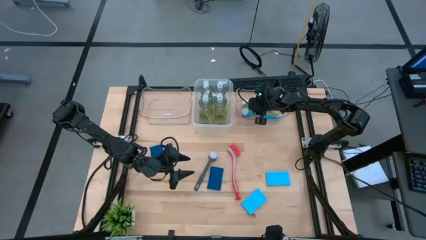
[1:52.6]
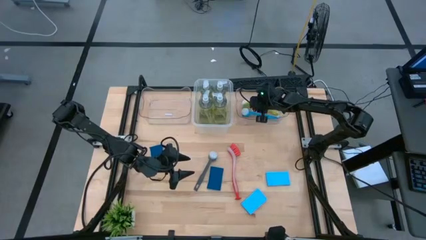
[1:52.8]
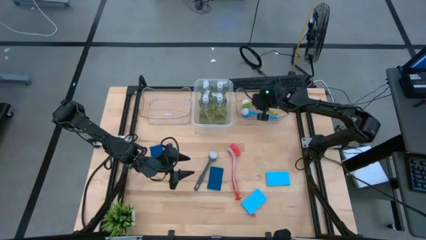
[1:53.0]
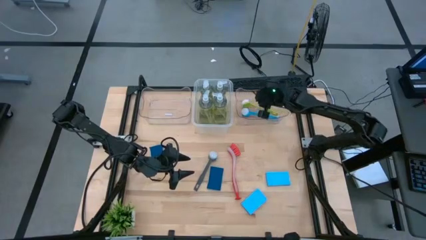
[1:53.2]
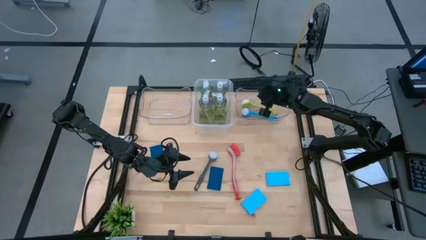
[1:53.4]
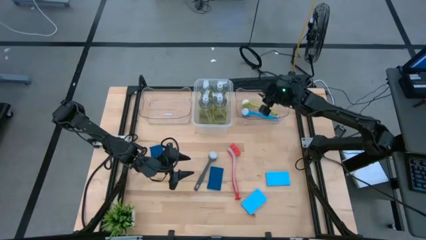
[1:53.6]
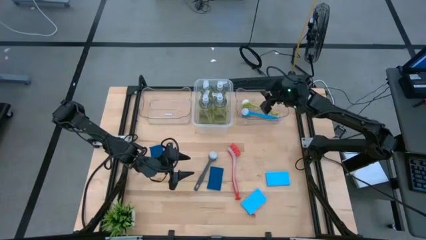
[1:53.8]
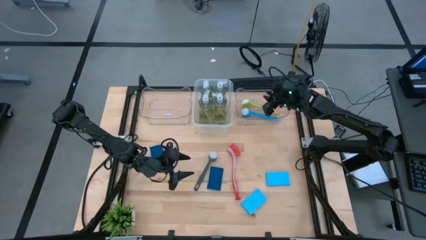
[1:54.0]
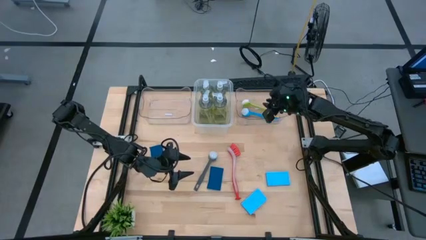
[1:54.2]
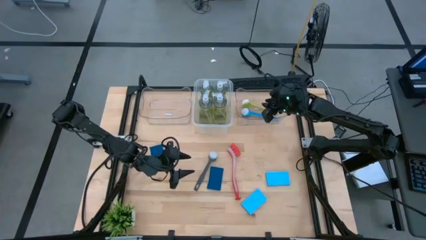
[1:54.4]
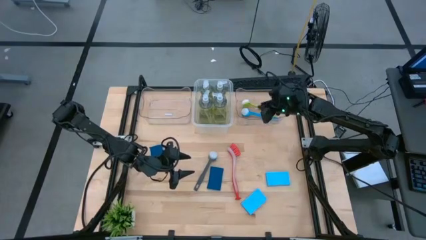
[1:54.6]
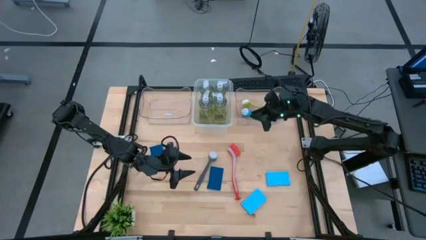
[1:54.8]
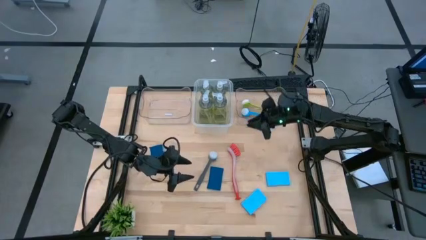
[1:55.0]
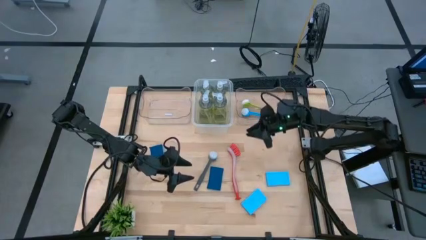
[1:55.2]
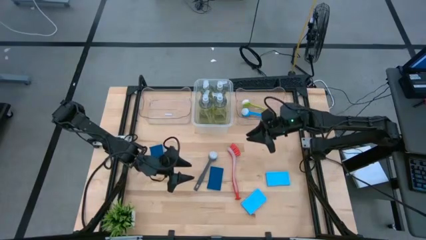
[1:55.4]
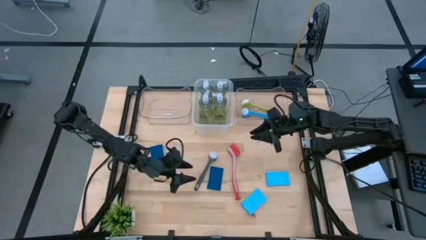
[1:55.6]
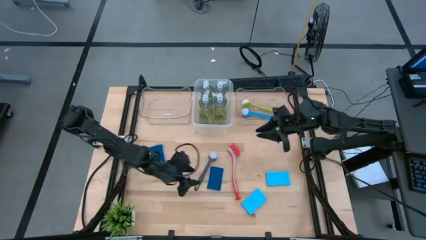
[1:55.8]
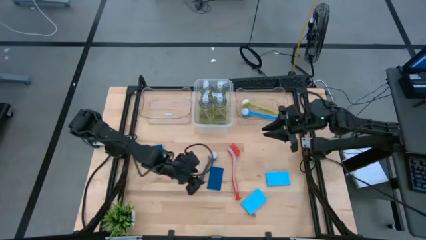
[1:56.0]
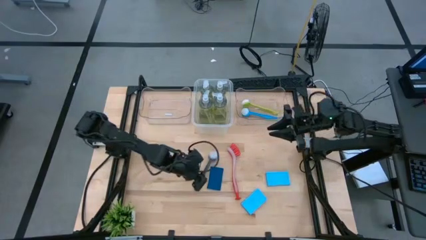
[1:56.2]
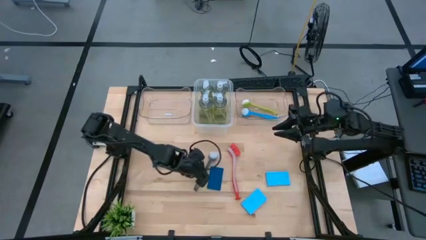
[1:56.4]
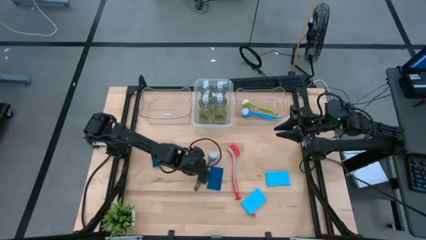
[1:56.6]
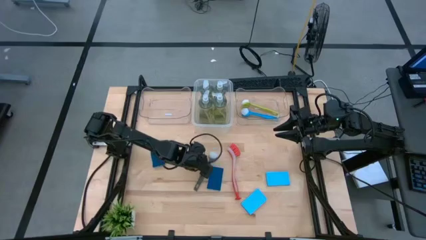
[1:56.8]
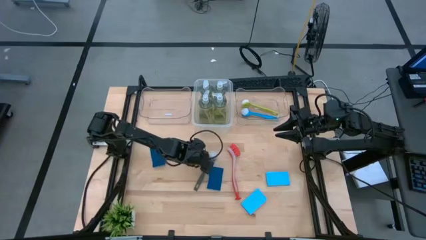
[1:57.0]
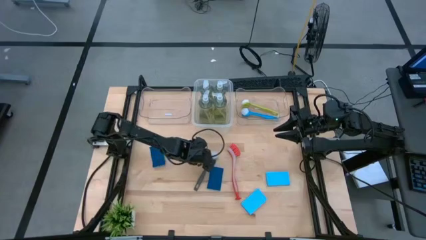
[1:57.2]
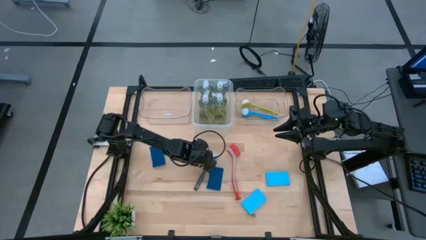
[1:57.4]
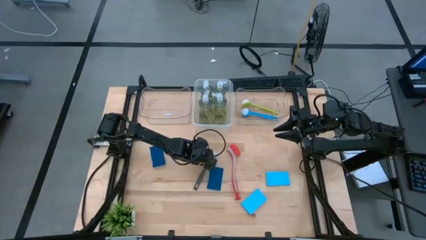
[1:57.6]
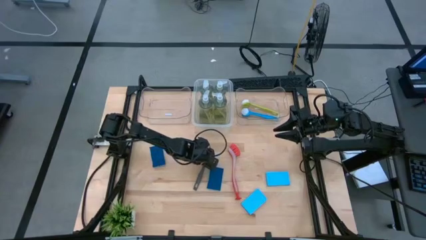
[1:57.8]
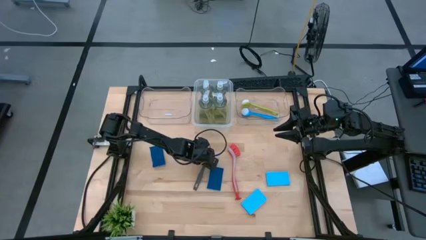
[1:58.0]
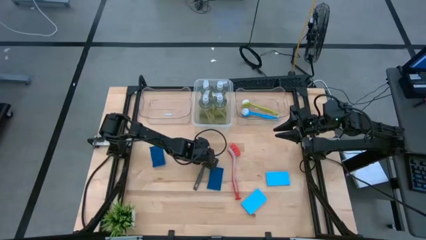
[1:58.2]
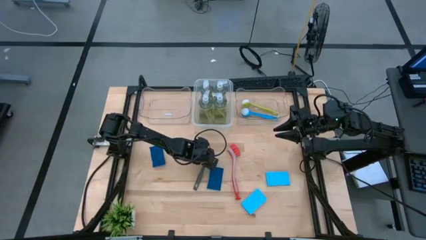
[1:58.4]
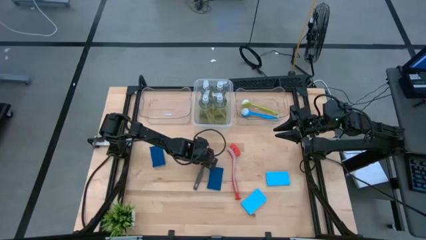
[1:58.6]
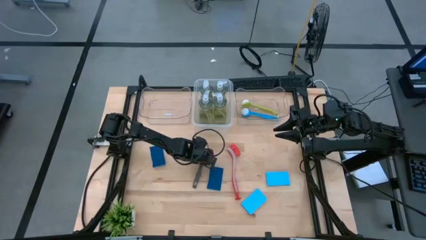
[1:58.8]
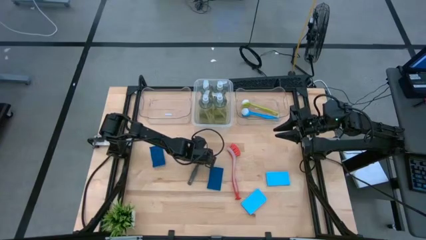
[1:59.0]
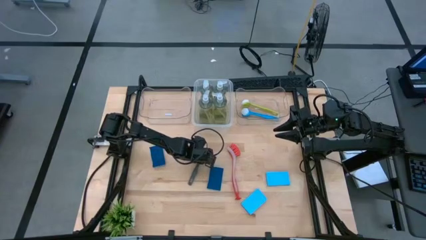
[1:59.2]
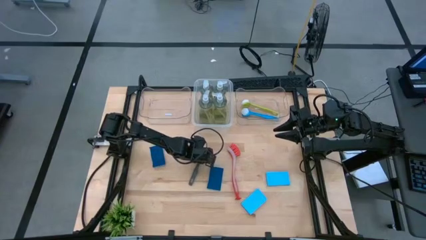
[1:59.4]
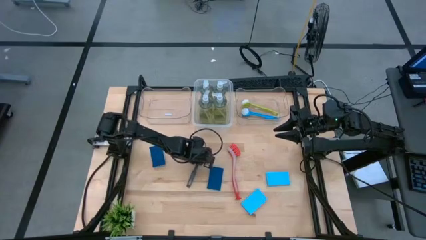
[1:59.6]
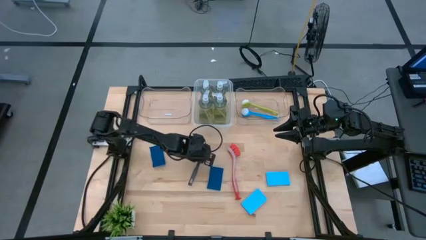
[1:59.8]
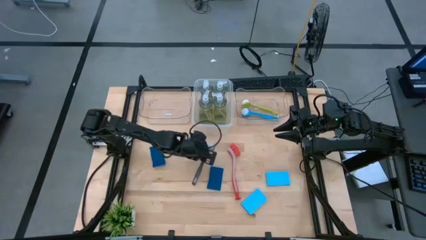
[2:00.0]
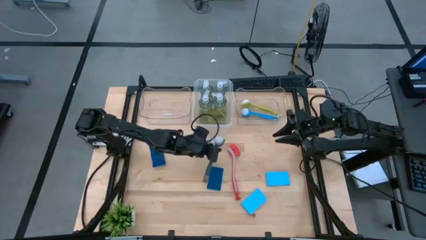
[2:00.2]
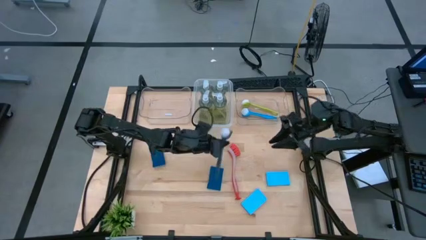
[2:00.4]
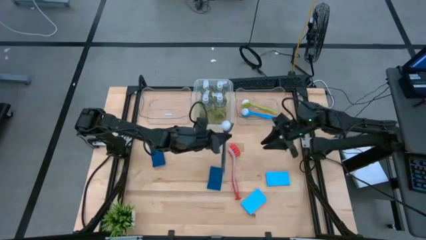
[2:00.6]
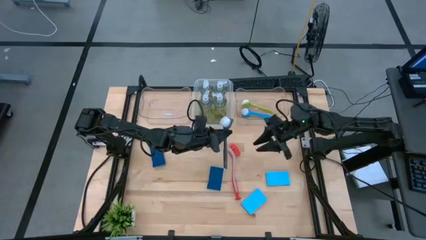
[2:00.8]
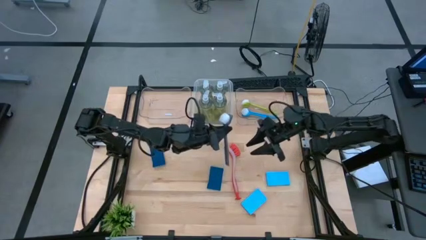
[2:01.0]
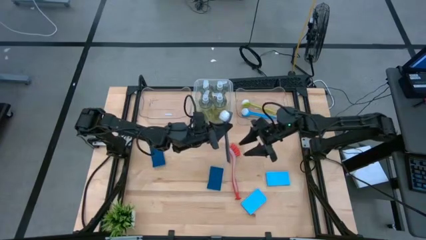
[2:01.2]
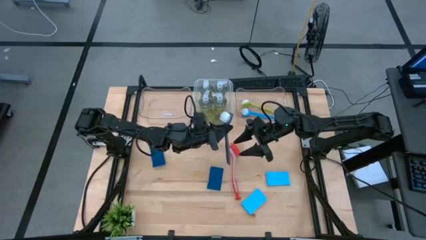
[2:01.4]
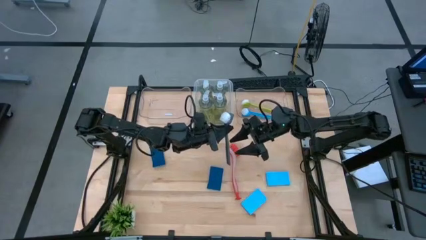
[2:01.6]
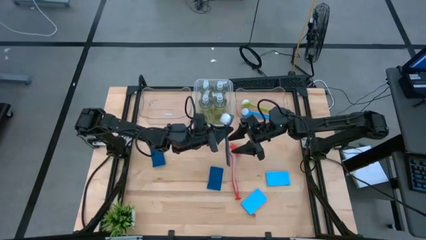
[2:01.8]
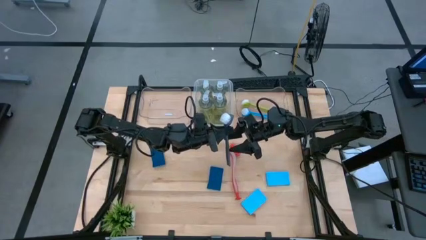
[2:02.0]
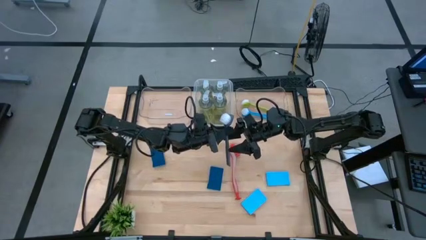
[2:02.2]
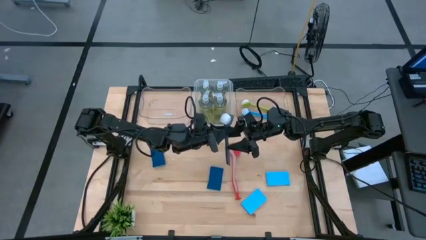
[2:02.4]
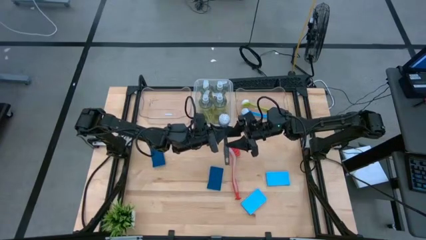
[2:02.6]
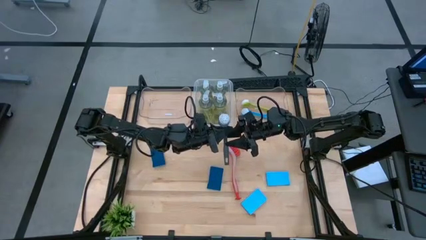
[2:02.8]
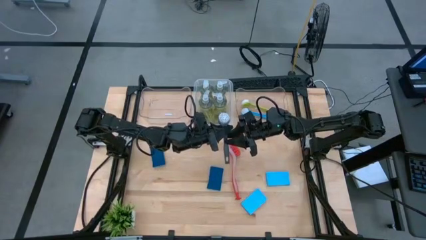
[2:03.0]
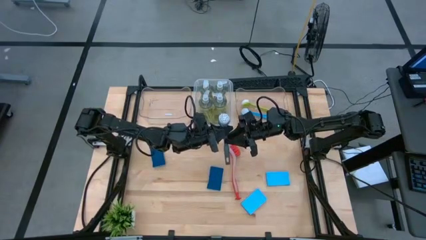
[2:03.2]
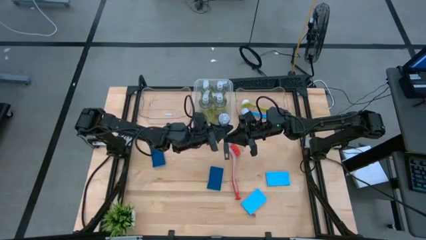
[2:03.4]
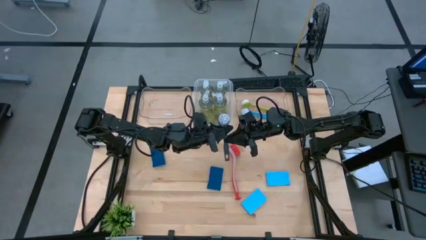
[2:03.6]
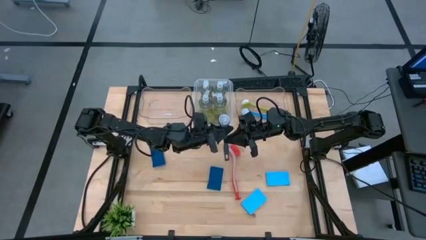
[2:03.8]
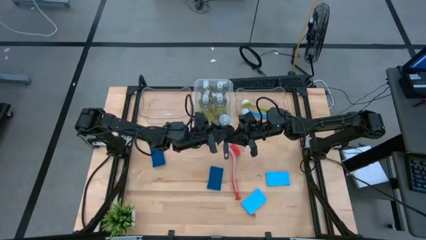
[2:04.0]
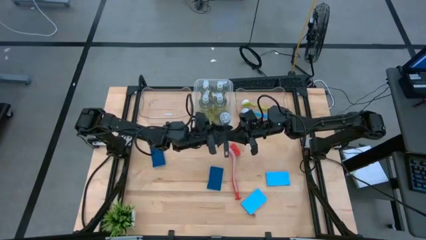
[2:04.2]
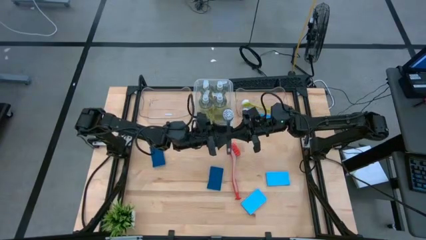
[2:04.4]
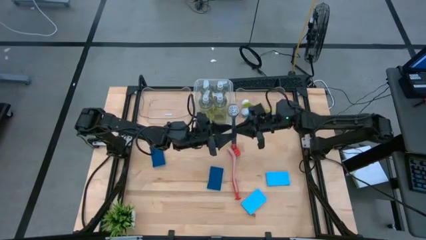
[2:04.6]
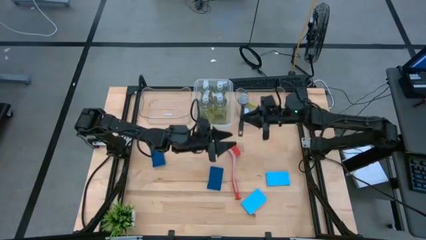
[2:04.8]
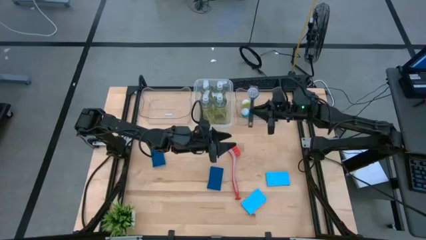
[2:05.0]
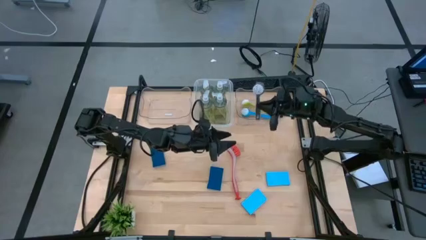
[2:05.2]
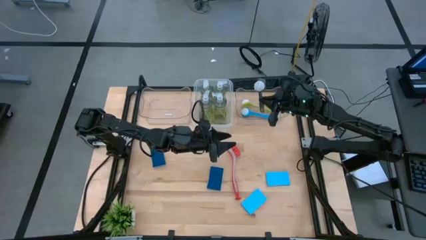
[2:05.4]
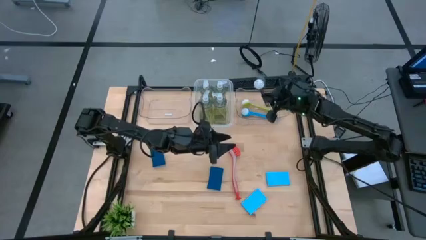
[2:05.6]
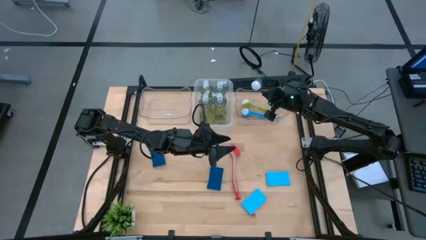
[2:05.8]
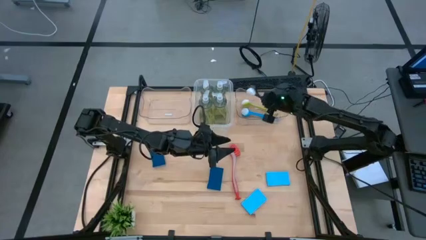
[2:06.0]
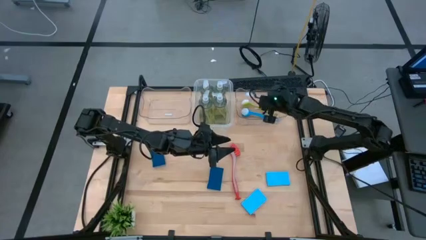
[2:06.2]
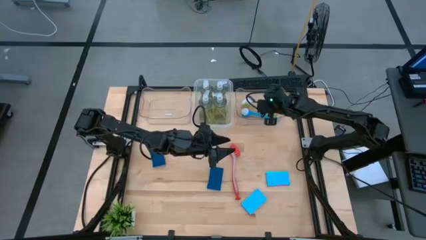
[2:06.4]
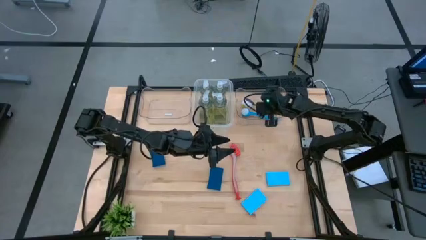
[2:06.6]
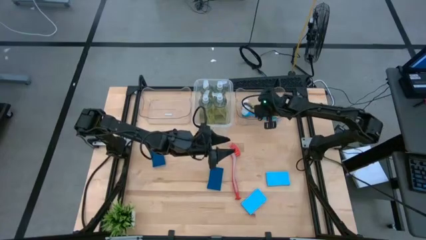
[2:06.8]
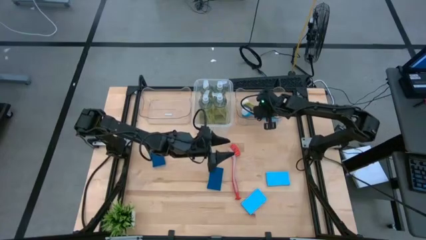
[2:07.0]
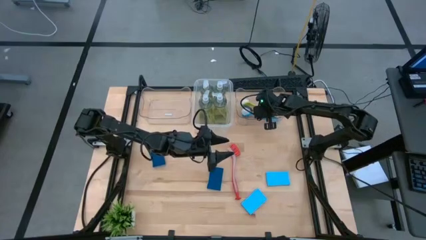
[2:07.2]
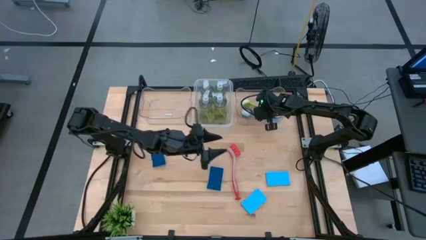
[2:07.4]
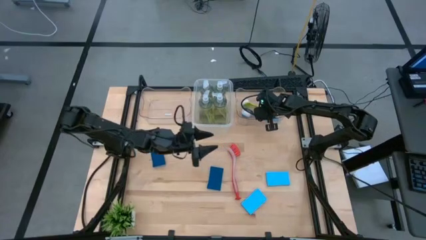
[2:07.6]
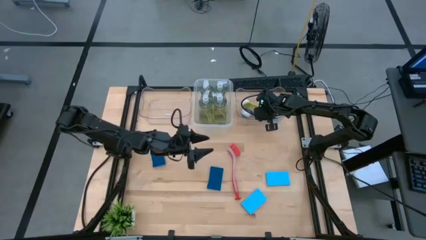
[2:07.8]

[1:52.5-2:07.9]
Task: Pick & Place Kitchen Sink Supplies
Put the black dish brush into the right transparent bin

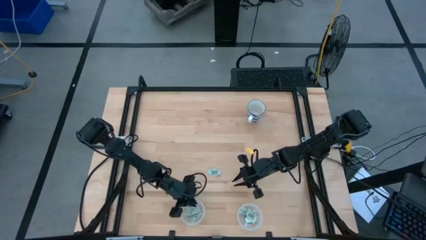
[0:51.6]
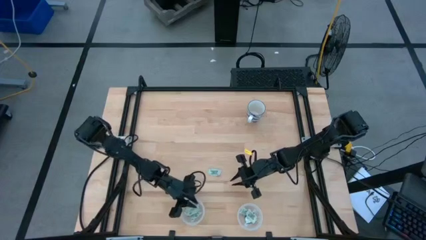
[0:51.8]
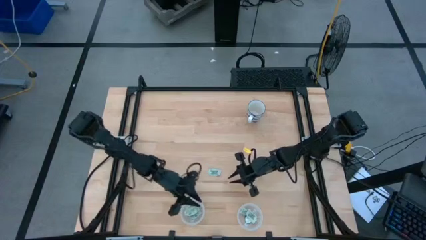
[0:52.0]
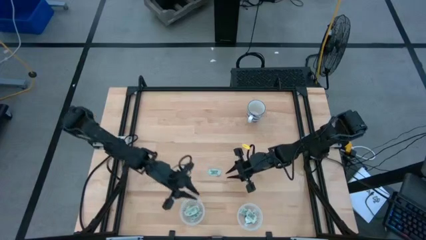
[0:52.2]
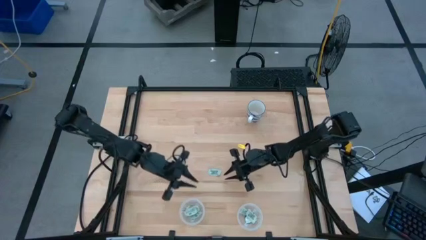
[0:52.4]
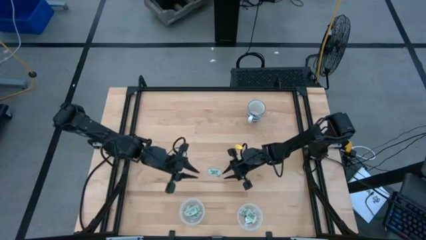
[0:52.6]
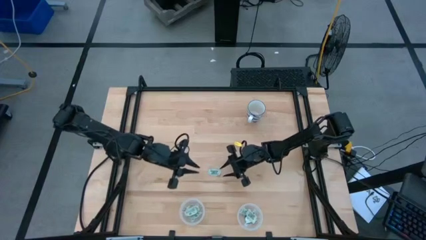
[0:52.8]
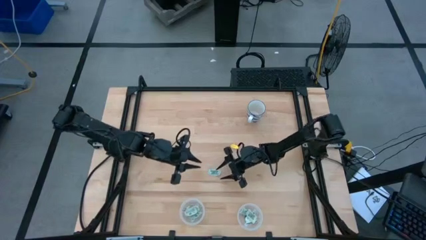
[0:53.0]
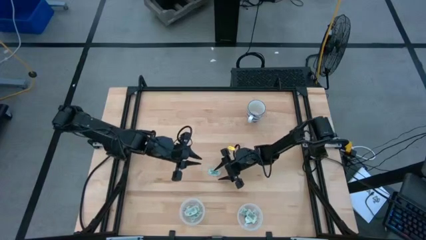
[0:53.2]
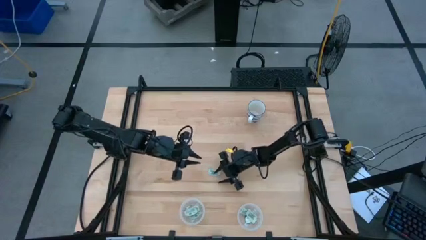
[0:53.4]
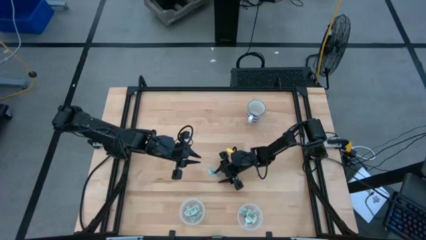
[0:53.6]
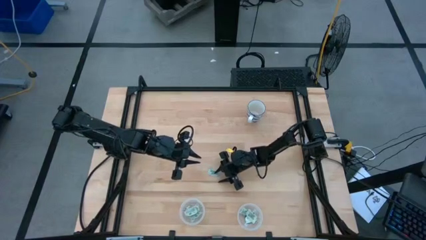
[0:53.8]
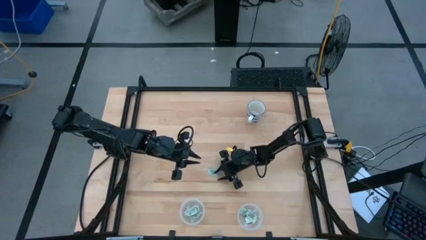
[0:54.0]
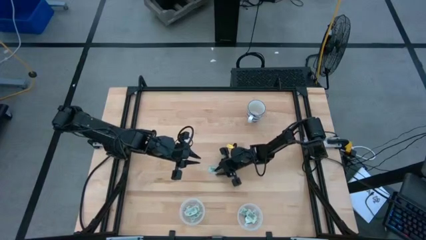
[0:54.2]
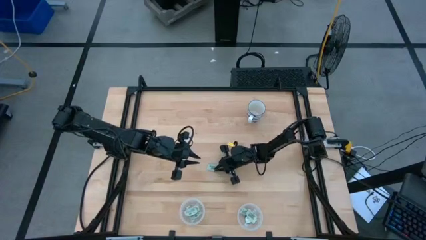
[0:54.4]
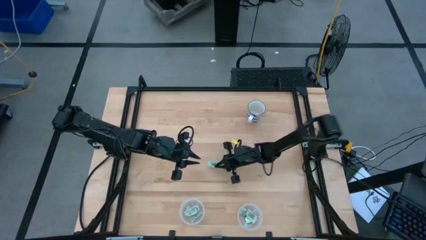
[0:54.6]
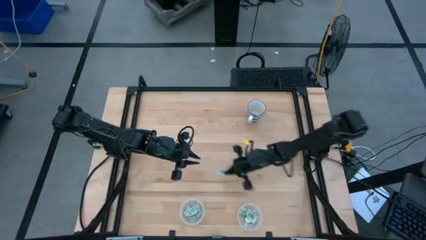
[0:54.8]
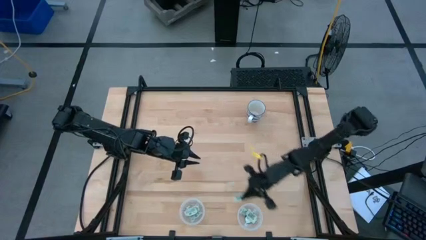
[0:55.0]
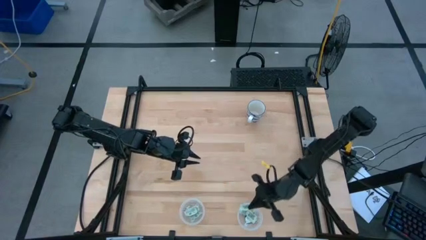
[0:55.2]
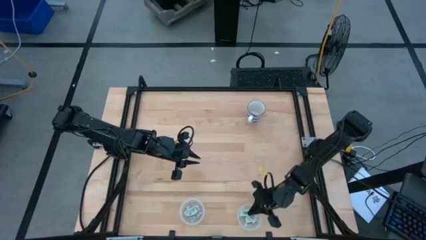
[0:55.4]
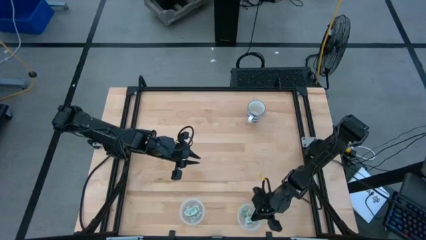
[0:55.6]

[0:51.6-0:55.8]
Task: Pick and place Stevia / Truvia into bins
Put the white stevia packet into the right transparent container
